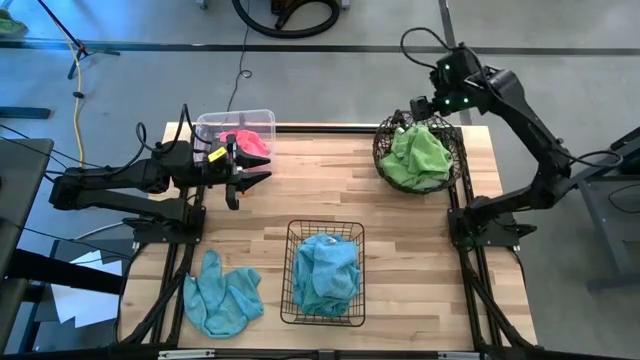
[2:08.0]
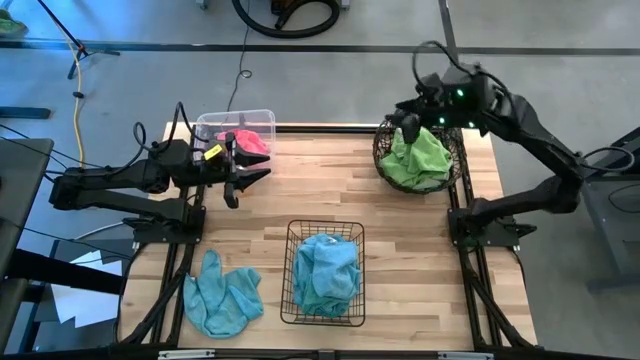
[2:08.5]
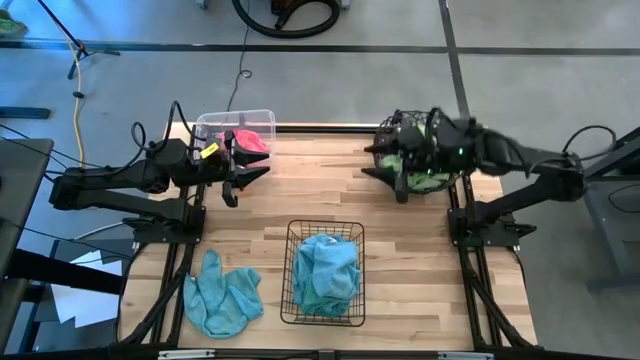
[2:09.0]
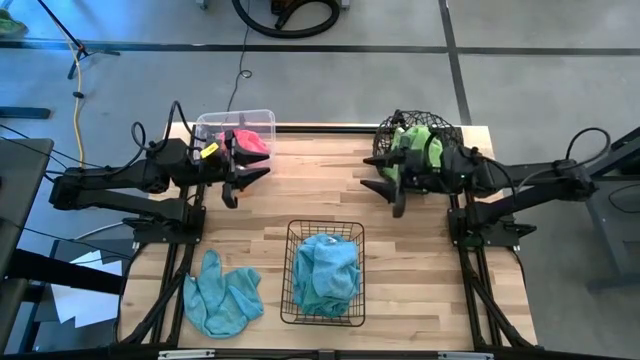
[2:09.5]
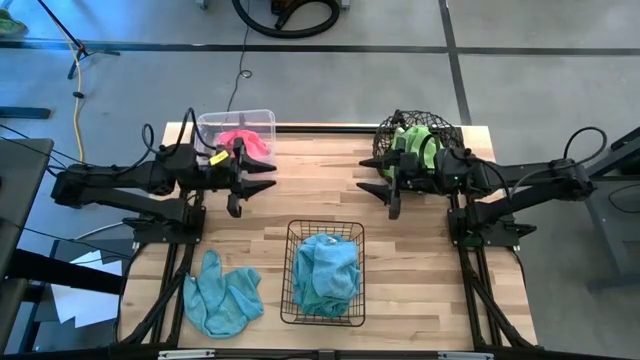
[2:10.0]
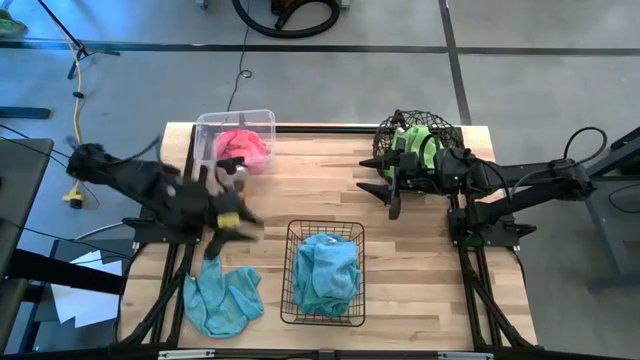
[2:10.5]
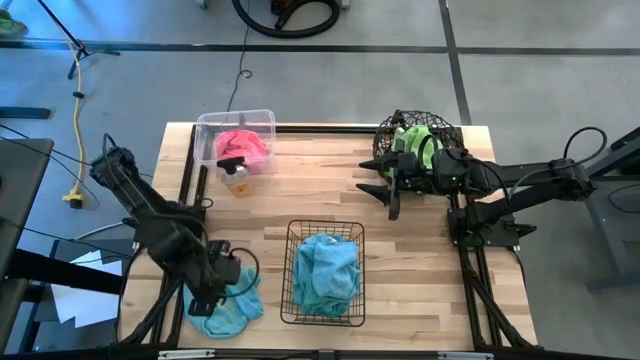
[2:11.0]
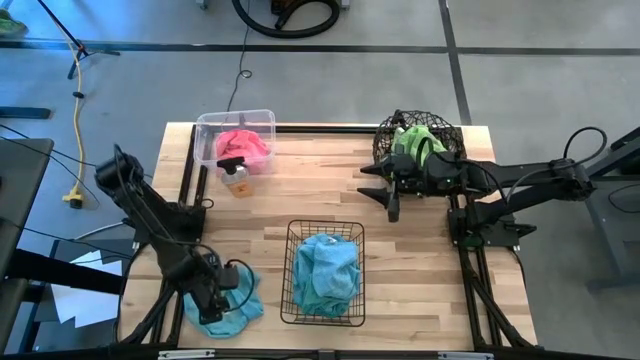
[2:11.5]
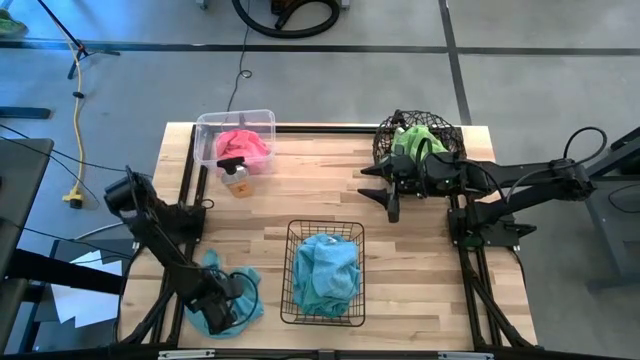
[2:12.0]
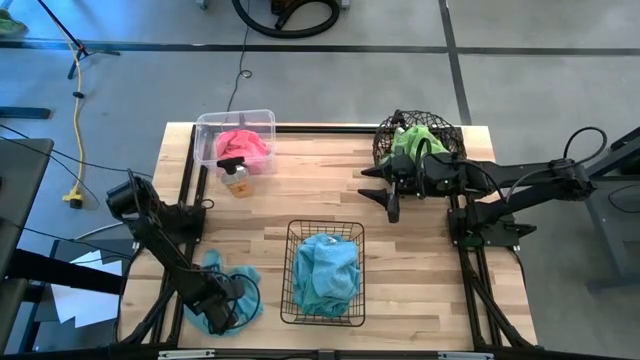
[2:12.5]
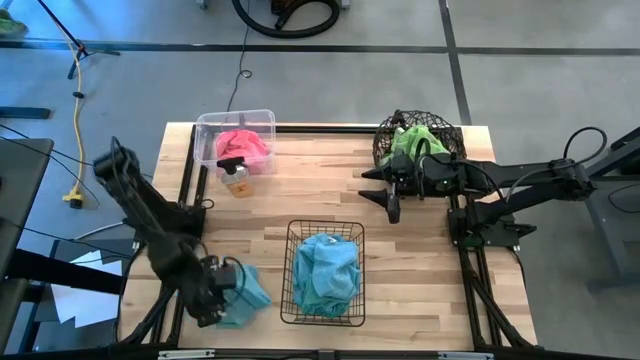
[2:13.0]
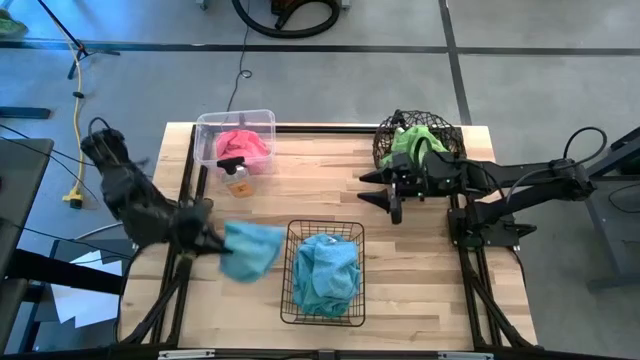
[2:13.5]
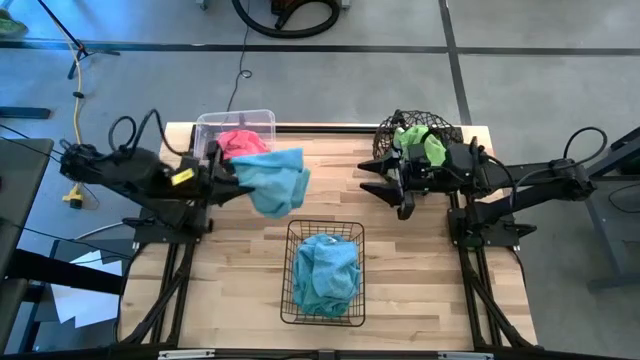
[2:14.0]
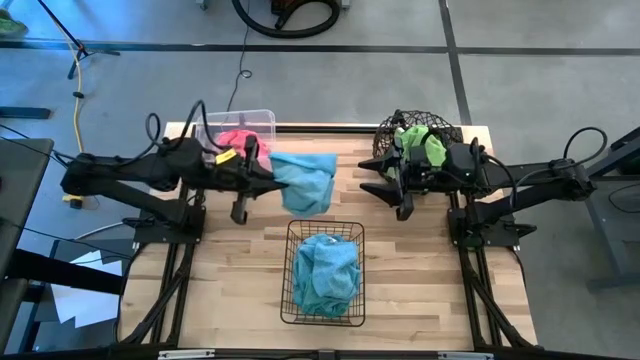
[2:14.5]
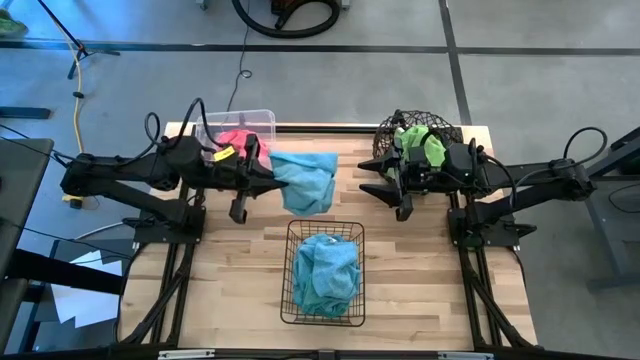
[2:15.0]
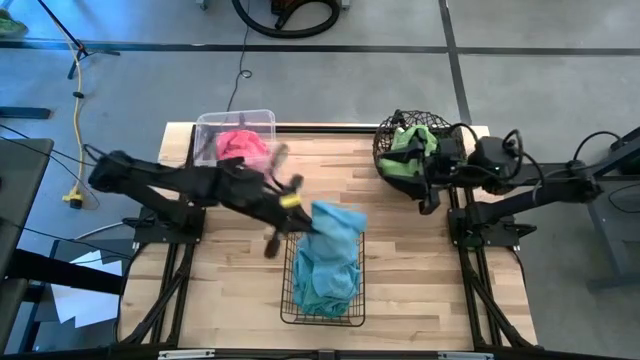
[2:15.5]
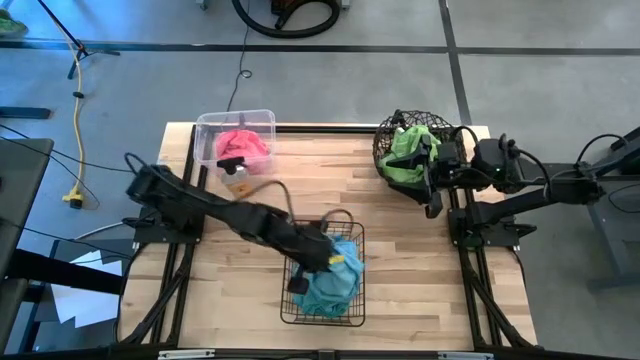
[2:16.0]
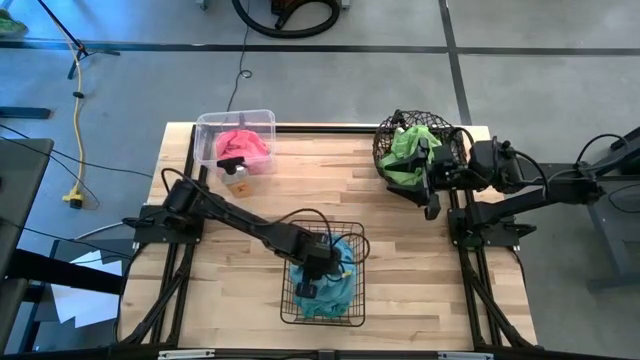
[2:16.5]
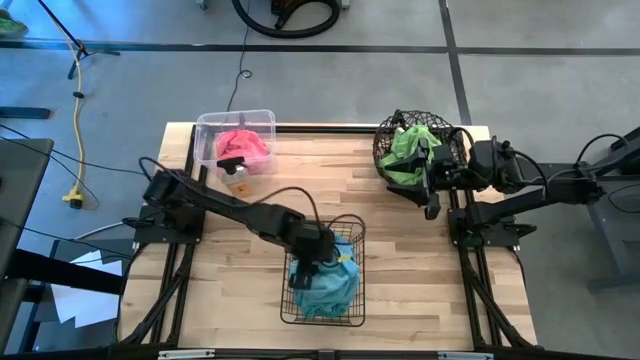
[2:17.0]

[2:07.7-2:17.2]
Task: Sort microfiber towel by color & place in baskets
Put the blue towel into the bottom basket

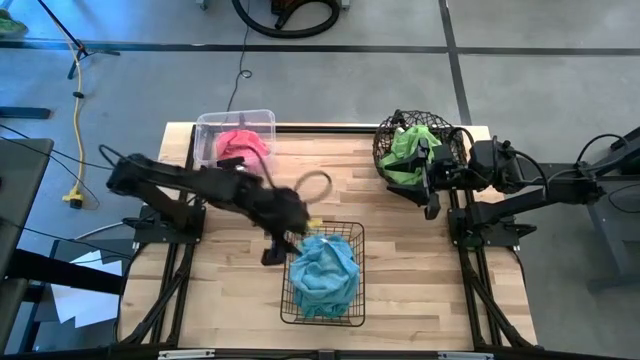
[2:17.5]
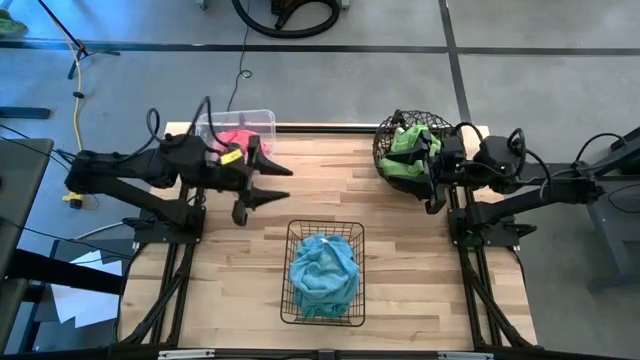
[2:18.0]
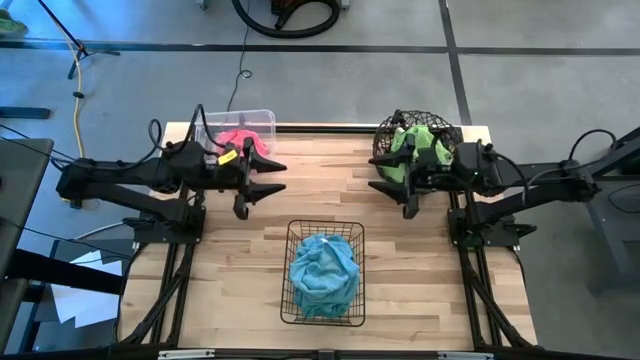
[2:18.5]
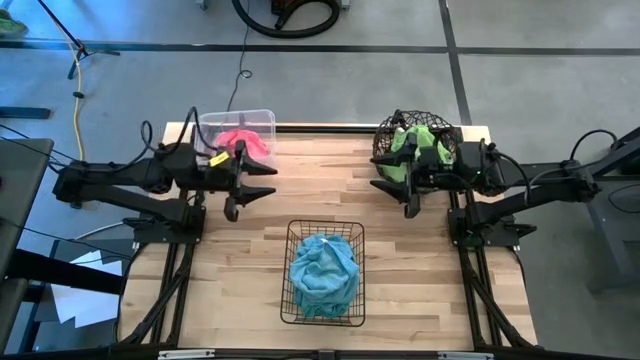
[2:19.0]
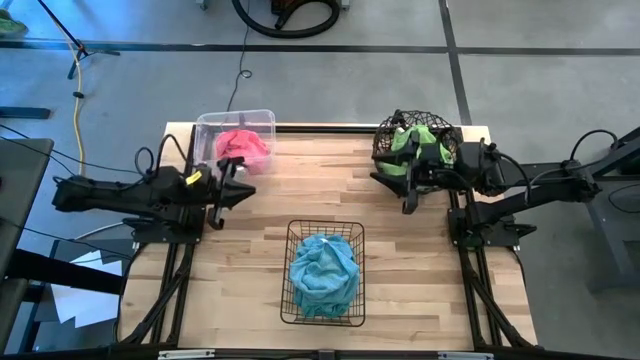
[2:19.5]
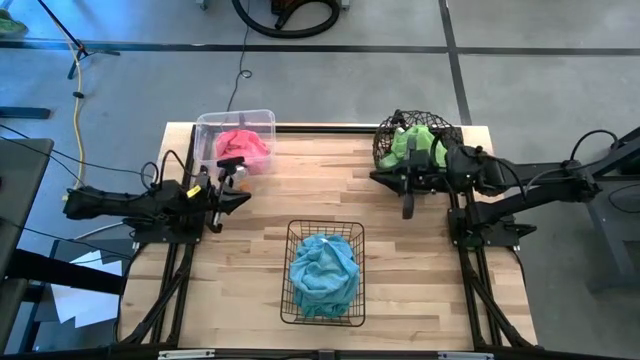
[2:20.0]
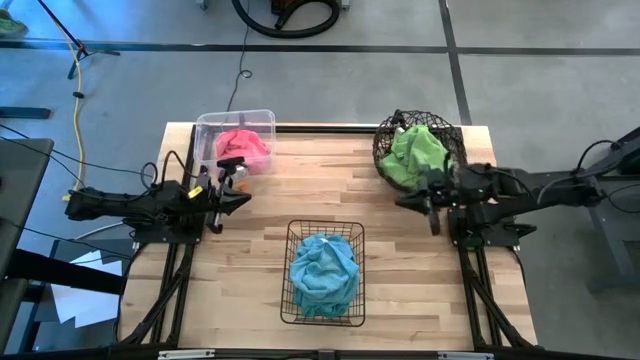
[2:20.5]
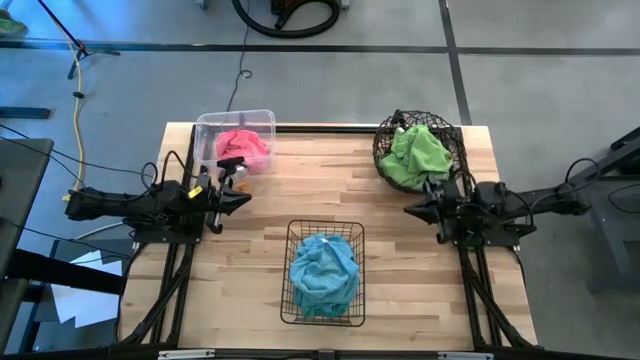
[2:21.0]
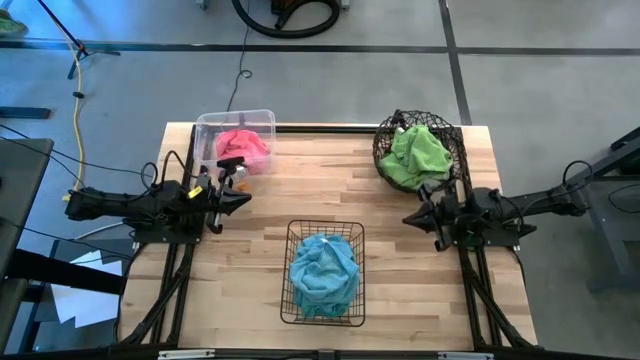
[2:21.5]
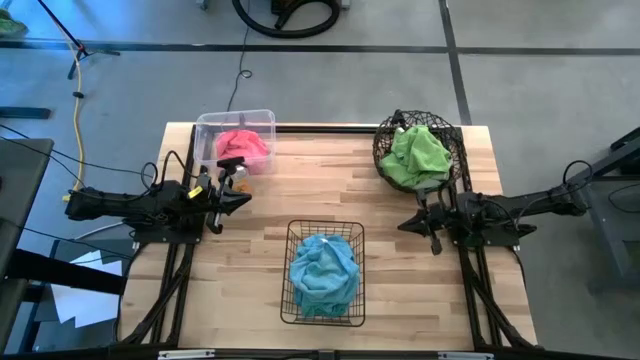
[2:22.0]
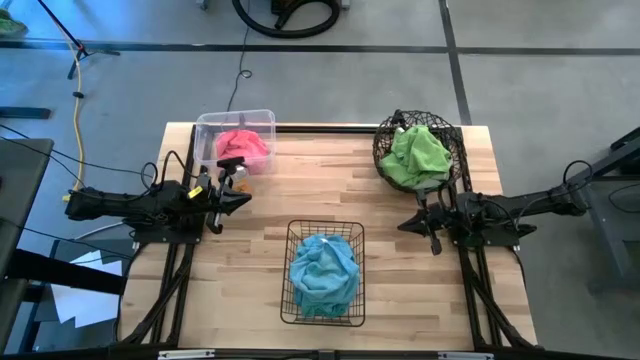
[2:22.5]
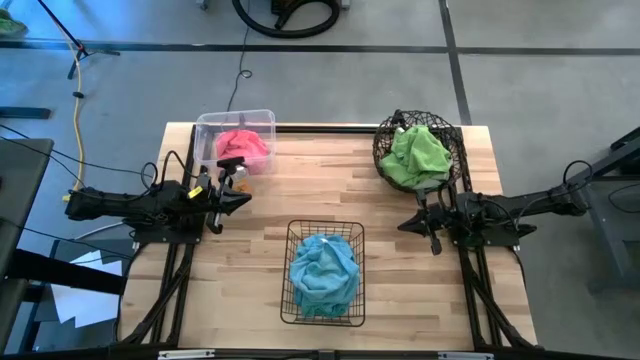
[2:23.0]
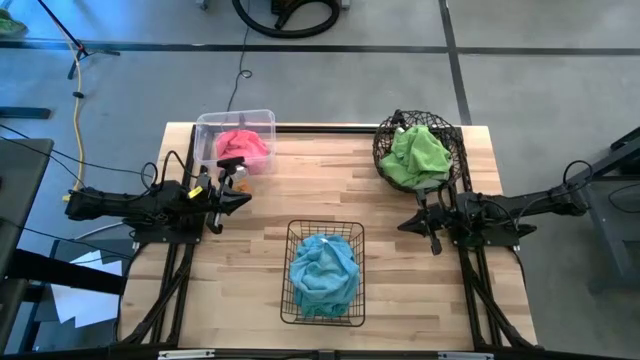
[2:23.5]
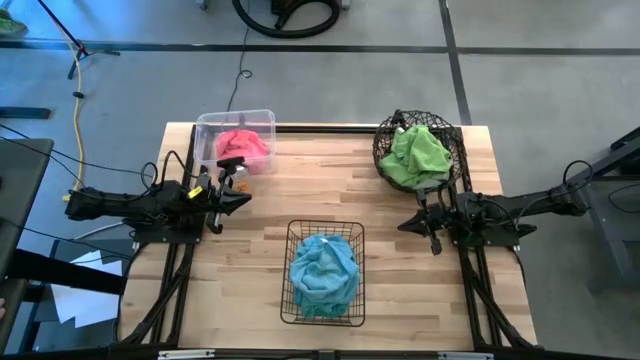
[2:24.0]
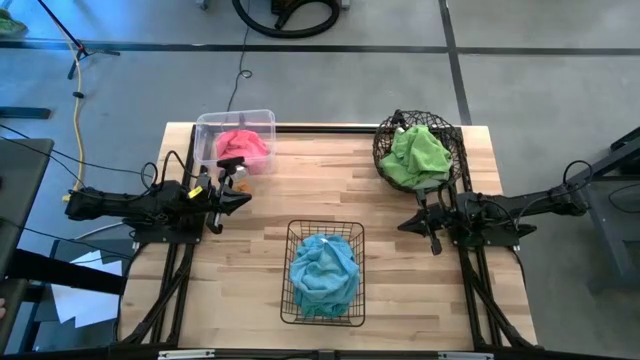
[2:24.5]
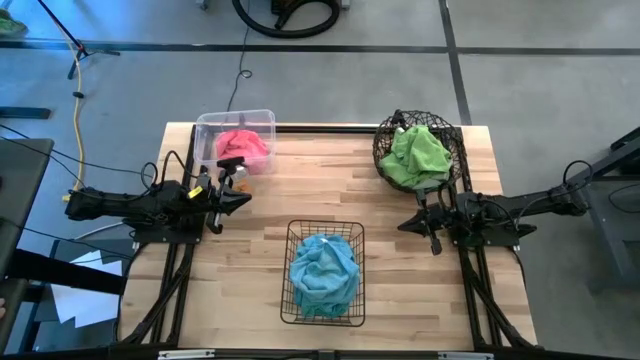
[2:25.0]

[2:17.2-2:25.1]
Return to Home Position

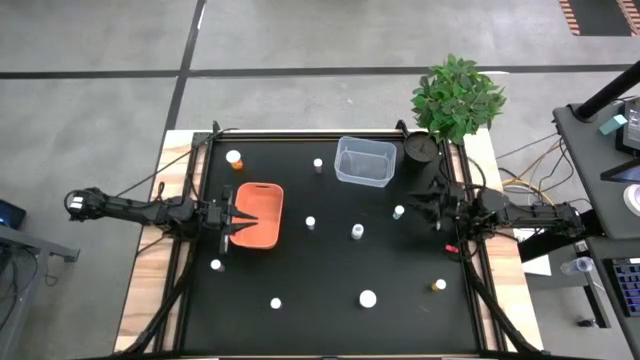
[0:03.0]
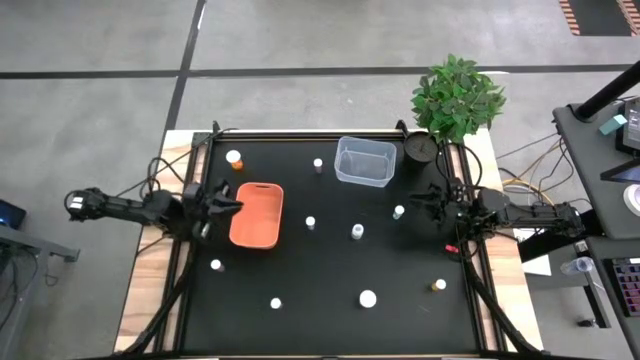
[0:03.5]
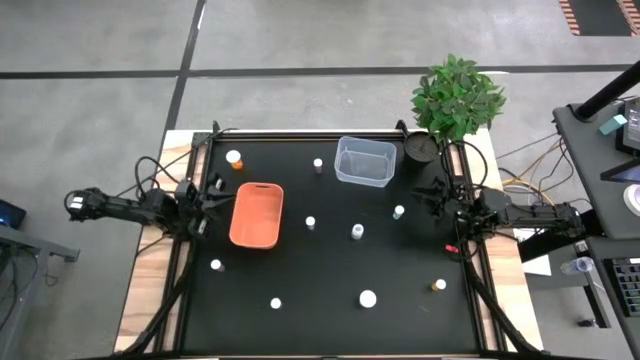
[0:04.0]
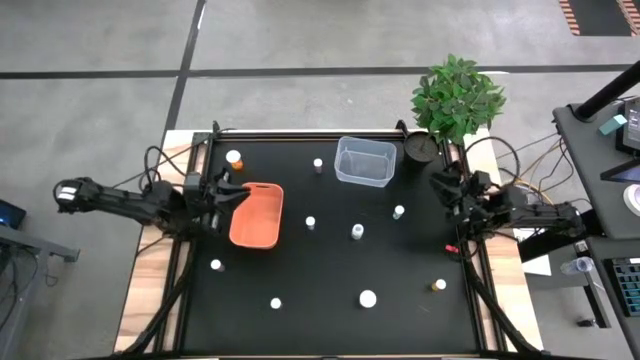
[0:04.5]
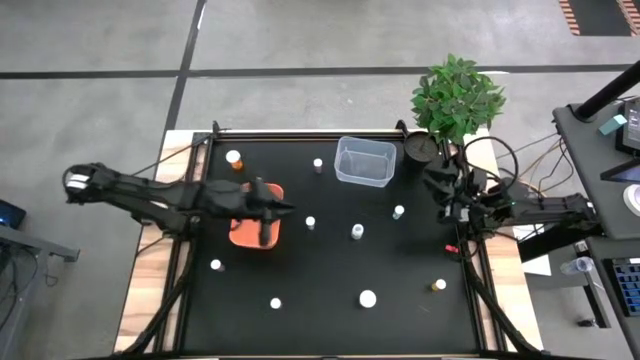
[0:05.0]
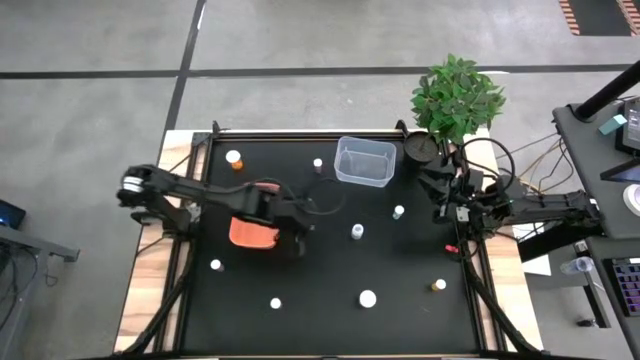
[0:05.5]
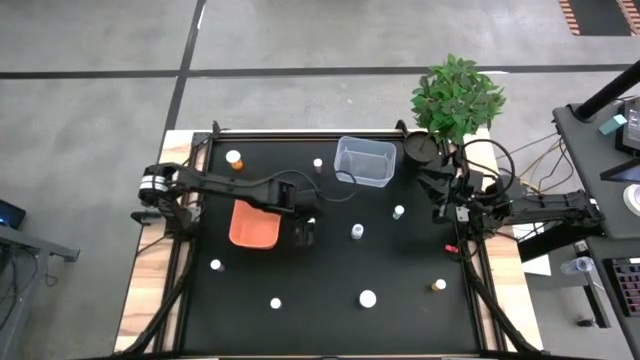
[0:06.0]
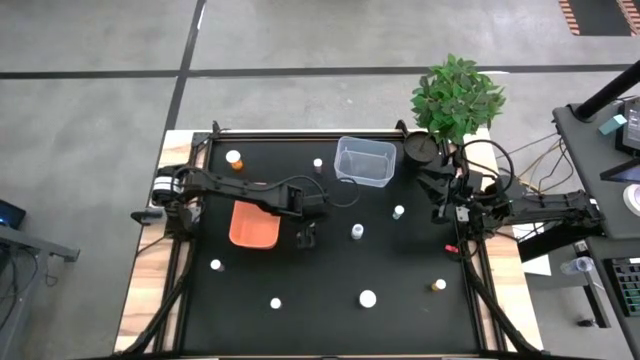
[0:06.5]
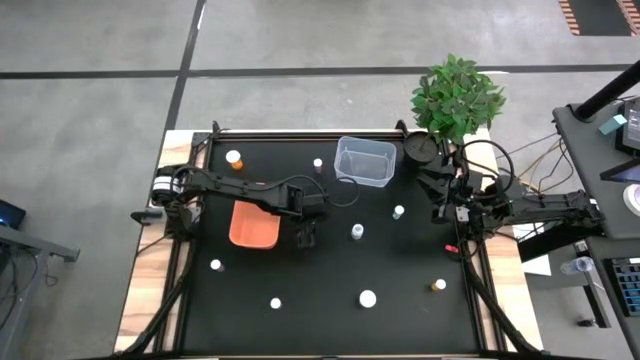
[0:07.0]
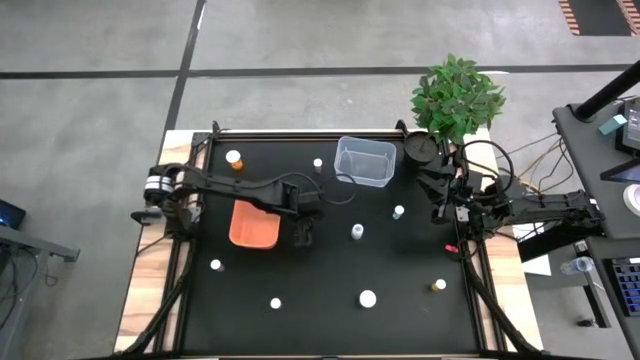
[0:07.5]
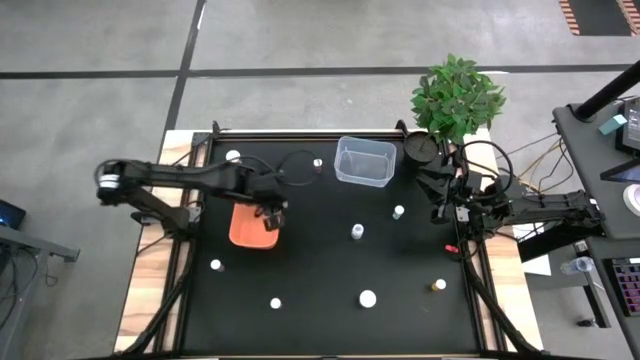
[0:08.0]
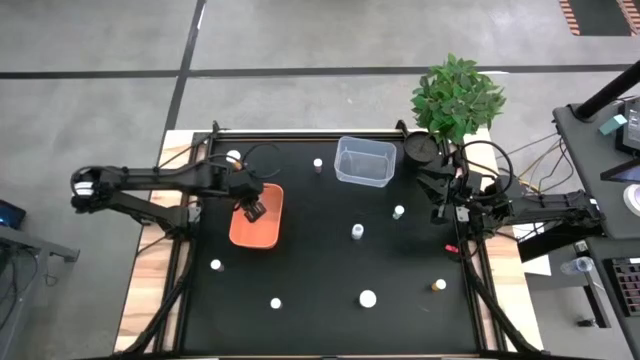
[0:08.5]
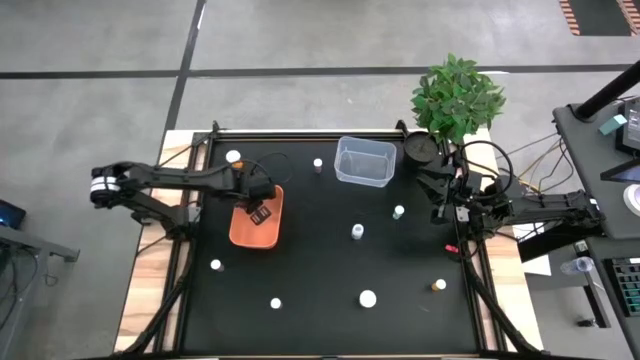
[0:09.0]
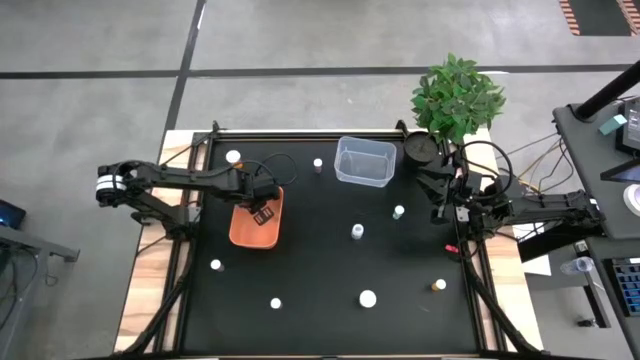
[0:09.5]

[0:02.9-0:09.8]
Task: Pick and place medicine bottles into bin by pill shape (circle, oval)
Put the green capsule pill bottle into the orange bin
